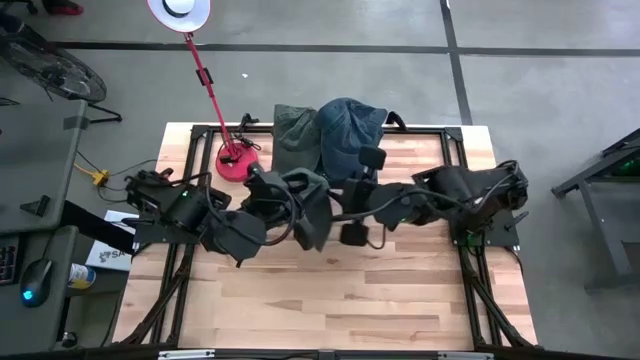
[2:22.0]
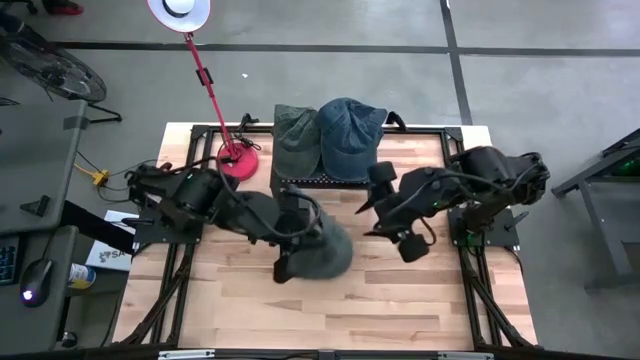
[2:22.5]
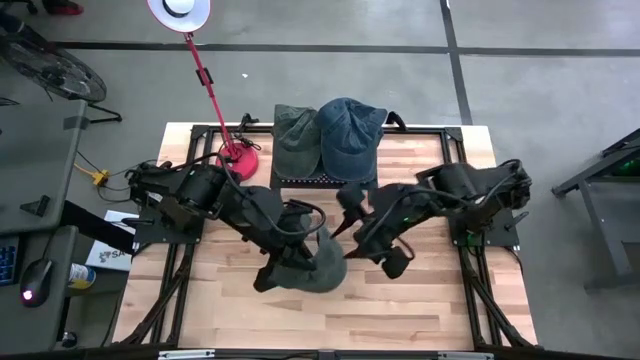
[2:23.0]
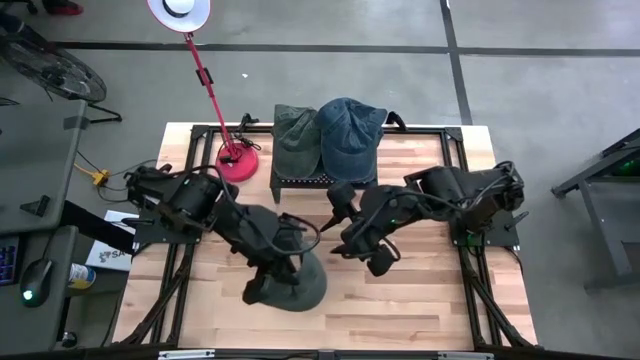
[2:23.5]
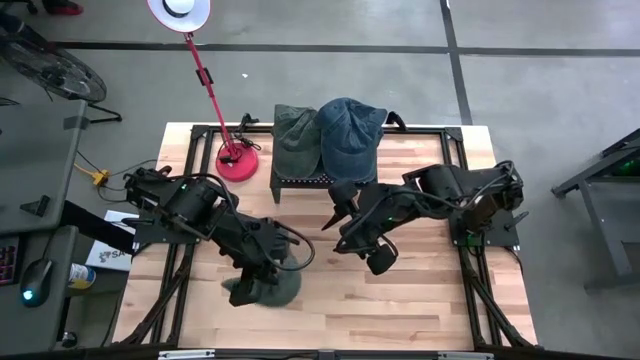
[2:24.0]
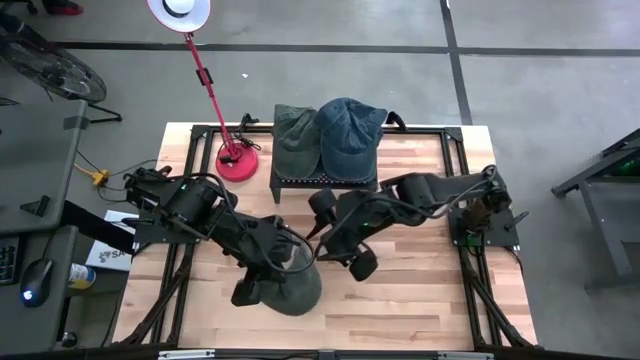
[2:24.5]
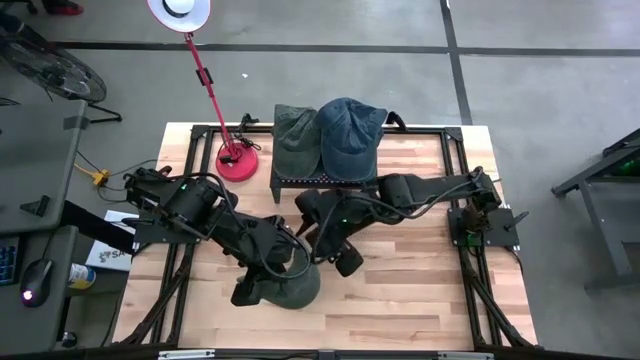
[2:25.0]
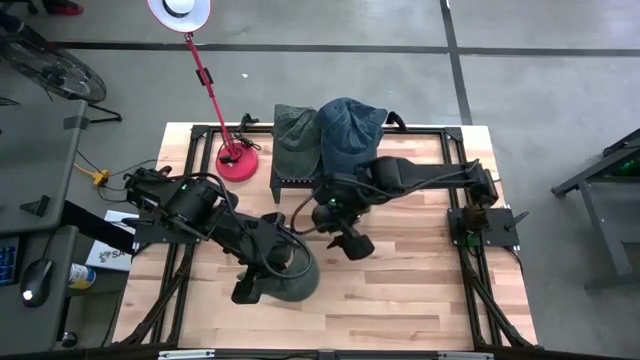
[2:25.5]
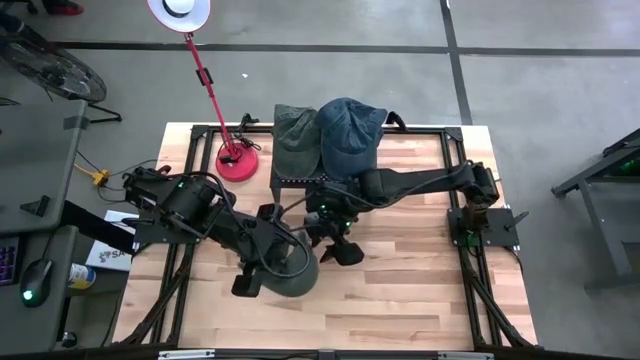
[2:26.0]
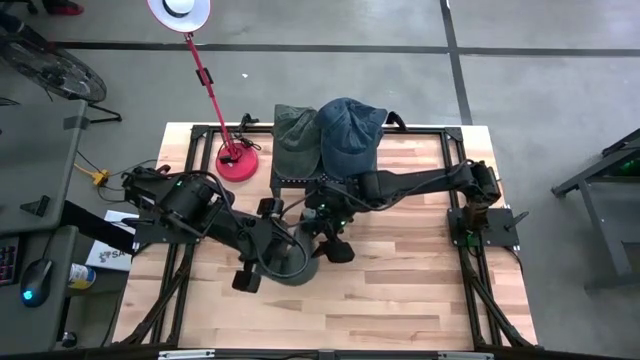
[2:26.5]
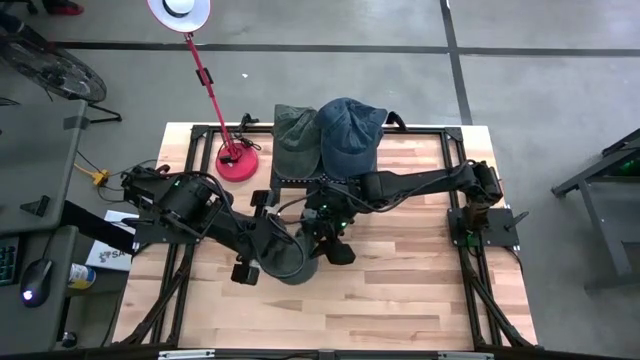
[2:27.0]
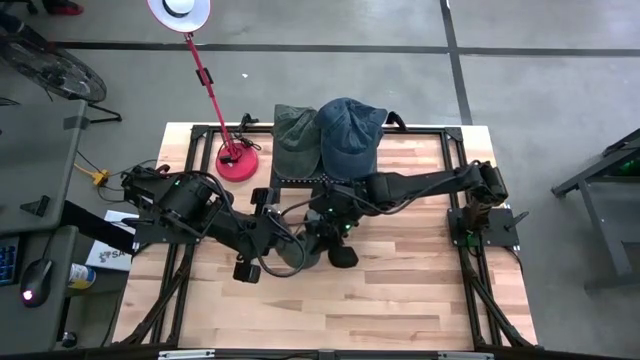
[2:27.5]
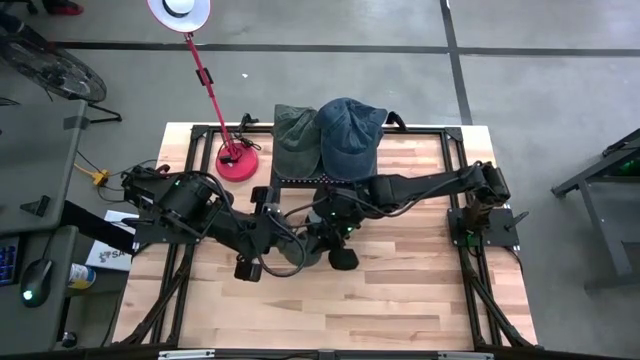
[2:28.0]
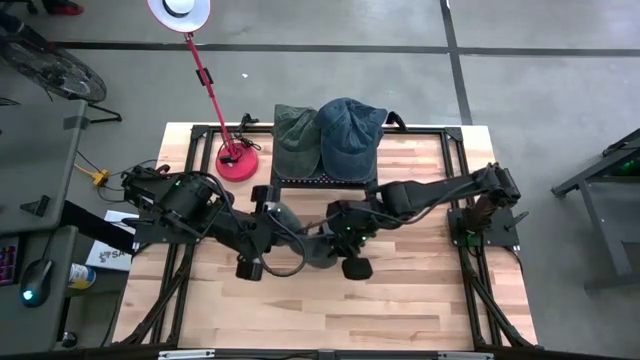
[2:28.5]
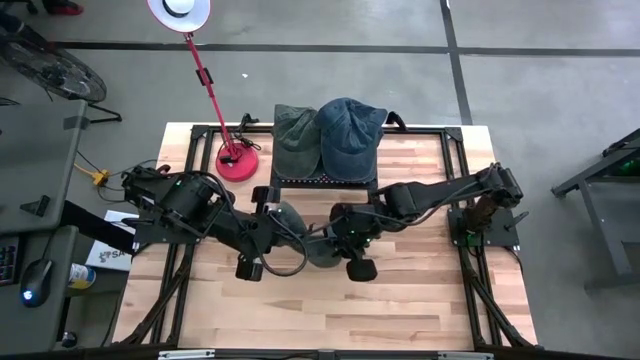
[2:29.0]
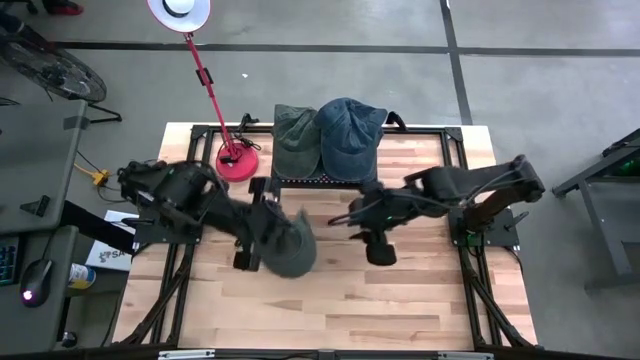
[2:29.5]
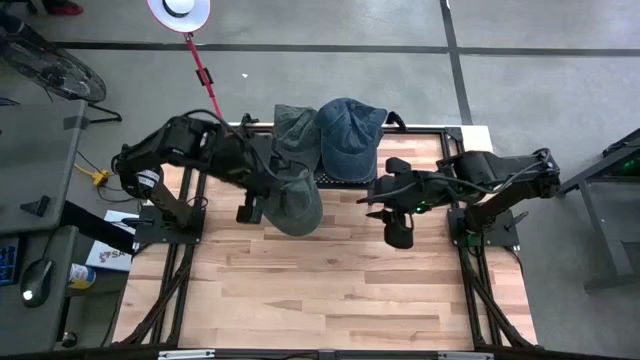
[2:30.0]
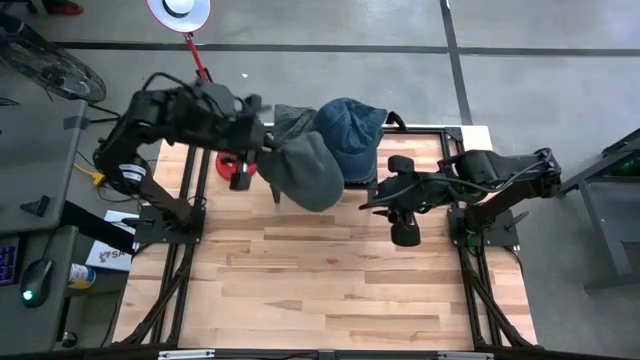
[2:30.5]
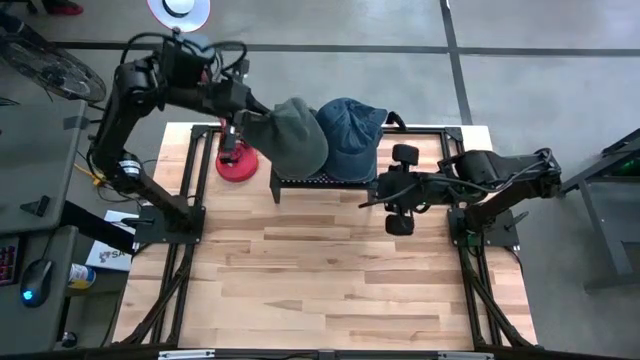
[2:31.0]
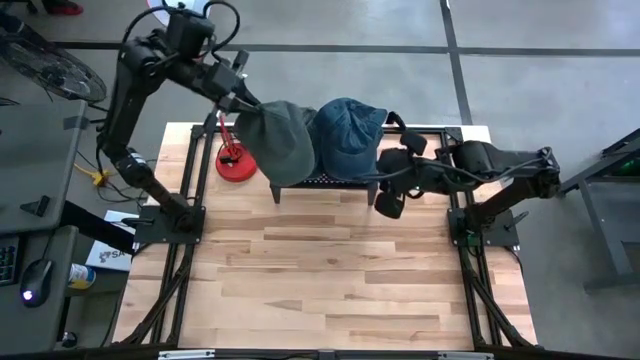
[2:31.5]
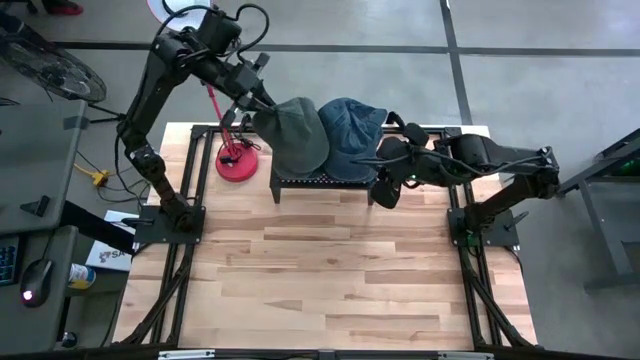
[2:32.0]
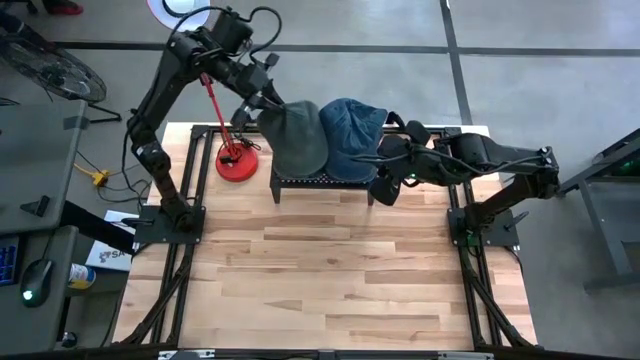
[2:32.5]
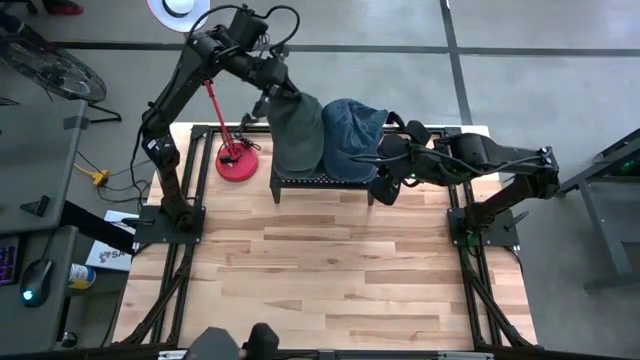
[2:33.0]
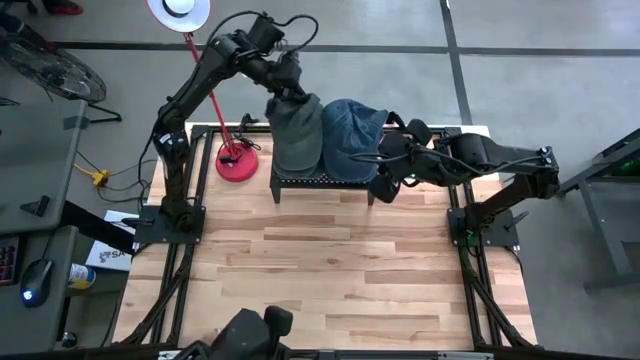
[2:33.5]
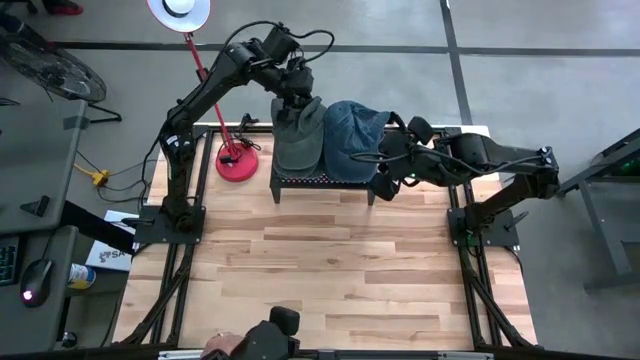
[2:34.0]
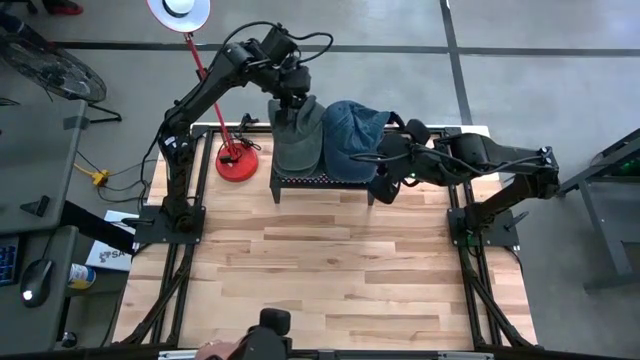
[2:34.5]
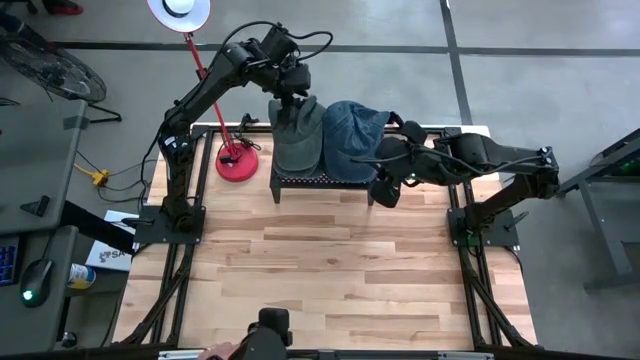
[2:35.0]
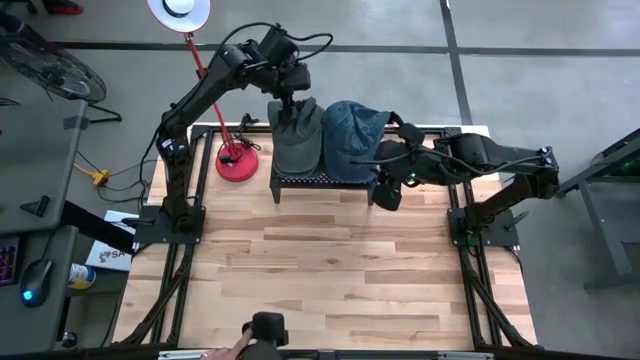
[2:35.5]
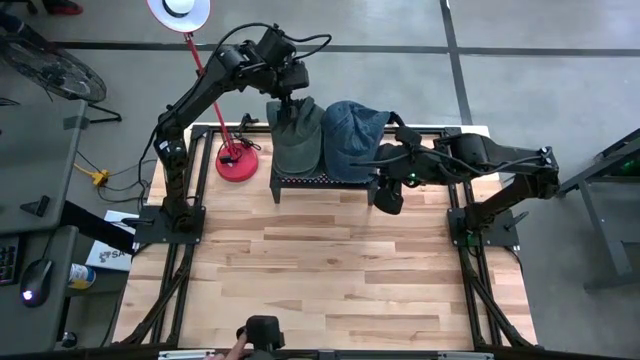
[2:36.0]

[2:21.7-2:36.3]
Task: Pick & Place hat
Stack the gray cap on top of the other gray cap on the shelf

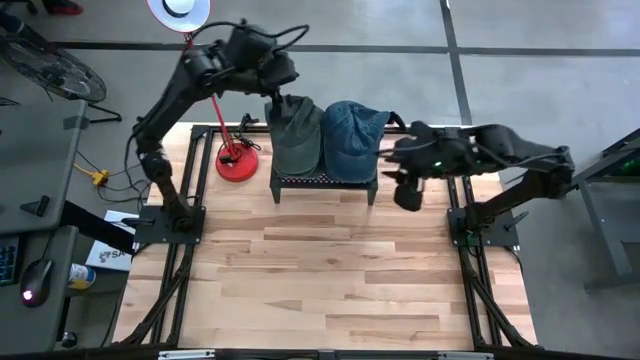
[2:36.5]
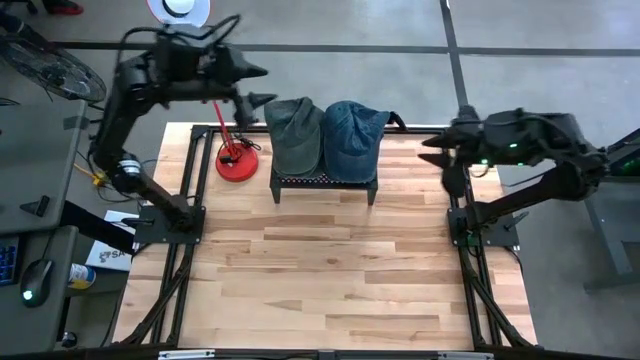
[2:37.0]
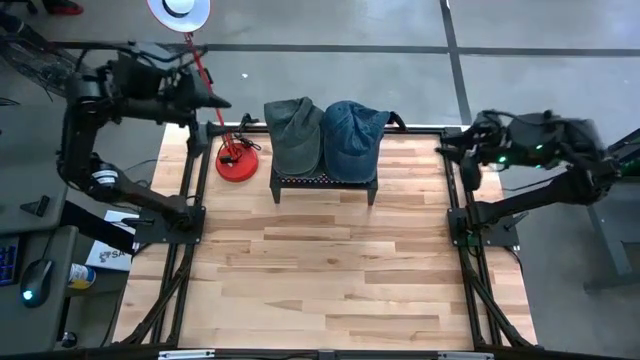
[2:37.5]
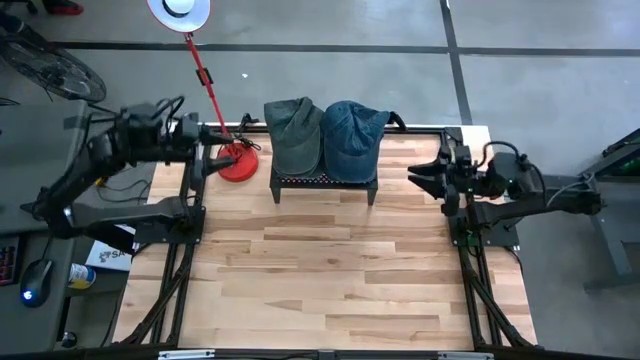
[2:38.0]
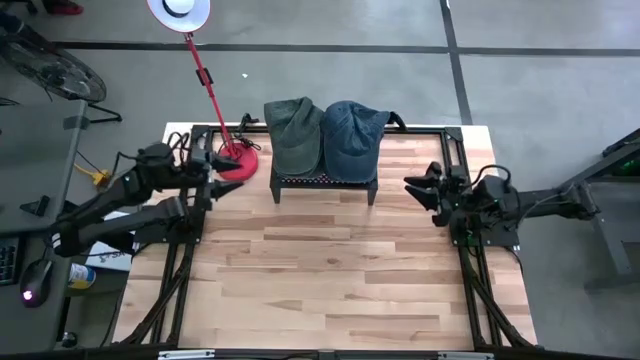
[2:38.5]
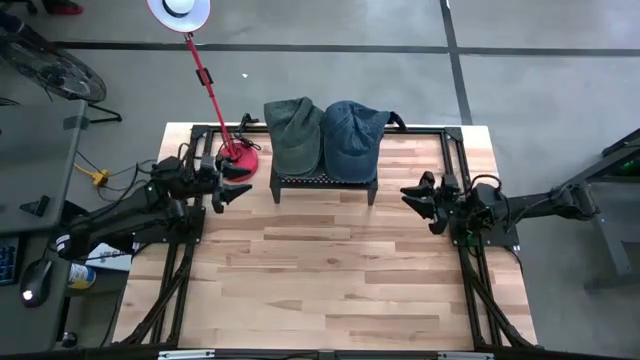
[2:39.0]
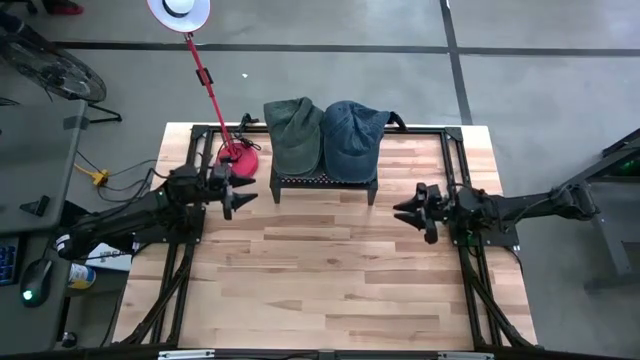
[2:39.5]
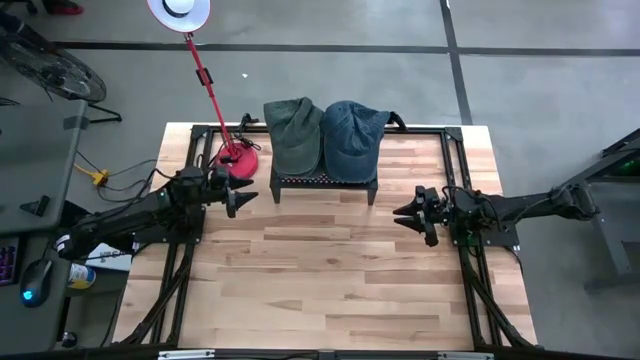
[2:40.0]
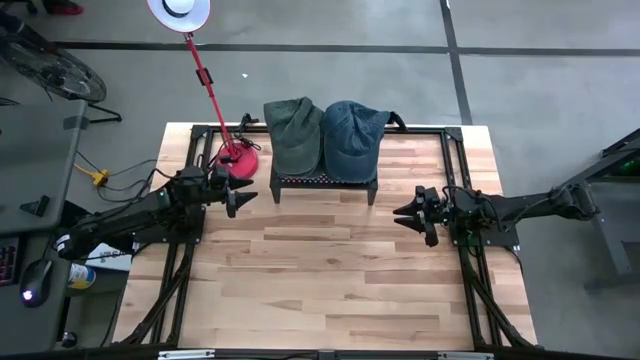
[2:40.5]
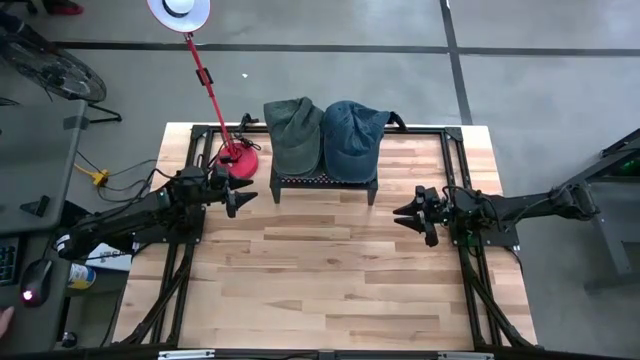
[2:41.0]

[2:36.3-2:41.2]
Return to Home Position

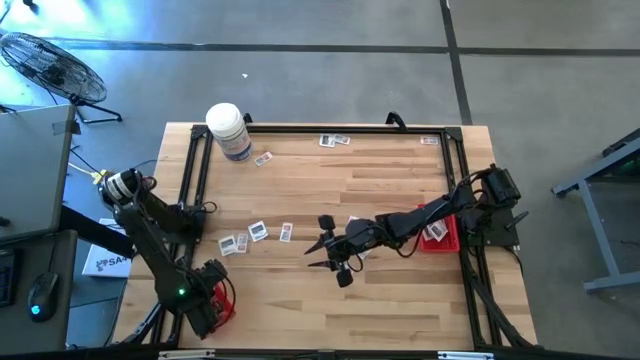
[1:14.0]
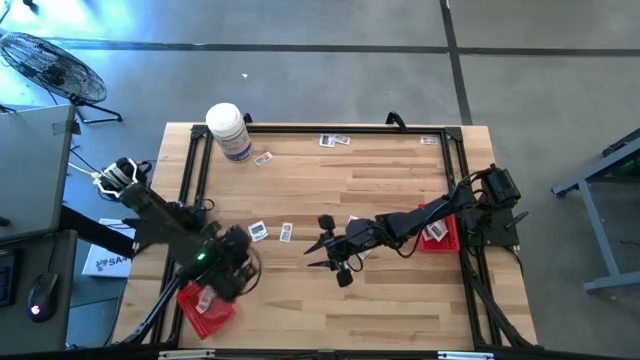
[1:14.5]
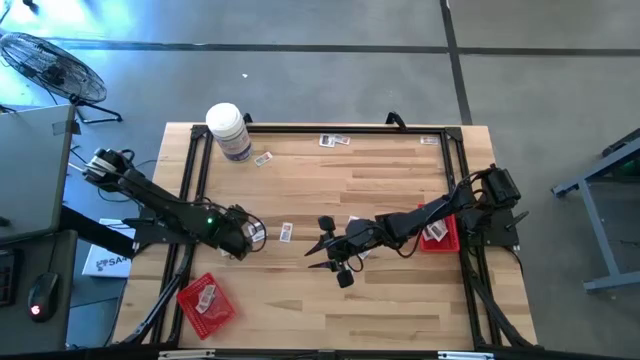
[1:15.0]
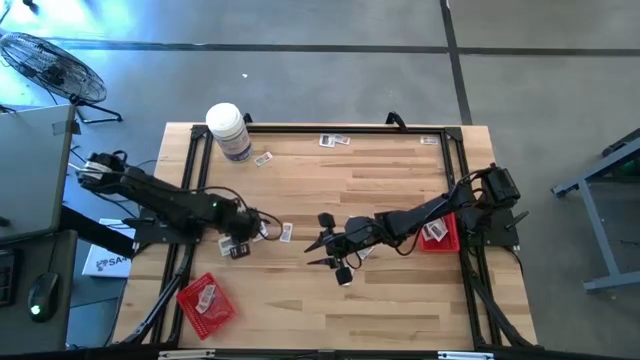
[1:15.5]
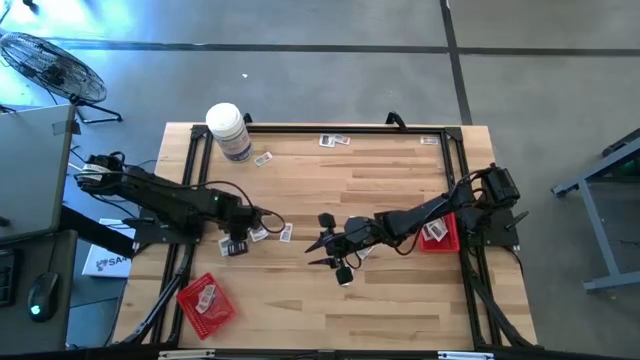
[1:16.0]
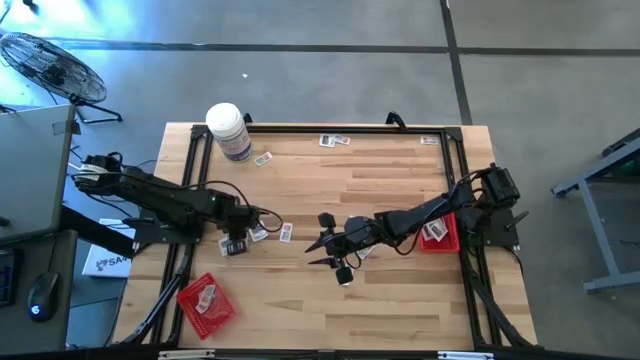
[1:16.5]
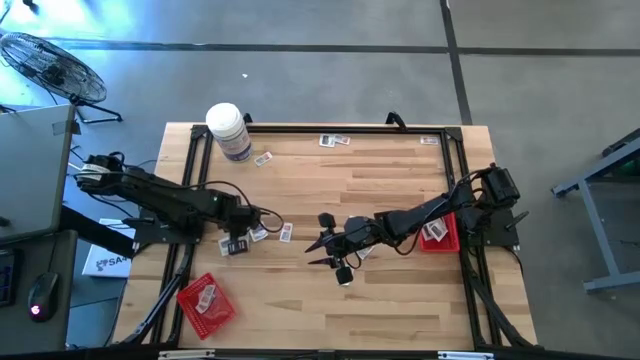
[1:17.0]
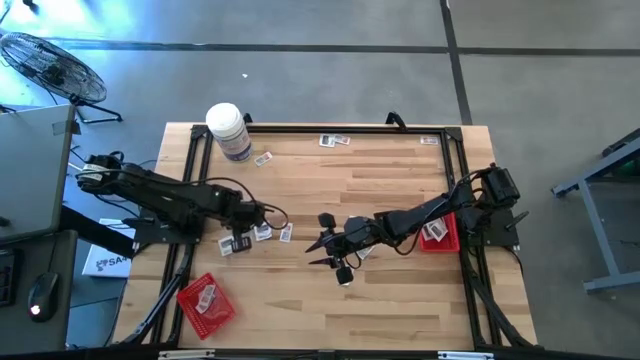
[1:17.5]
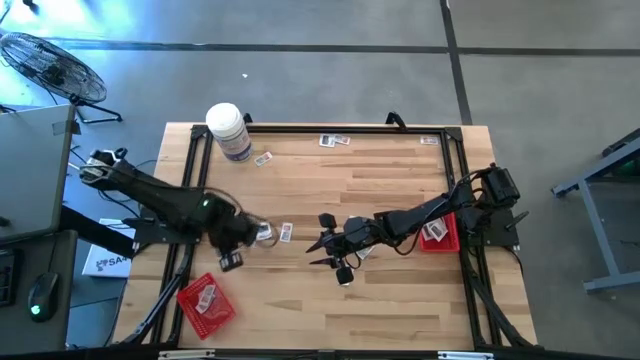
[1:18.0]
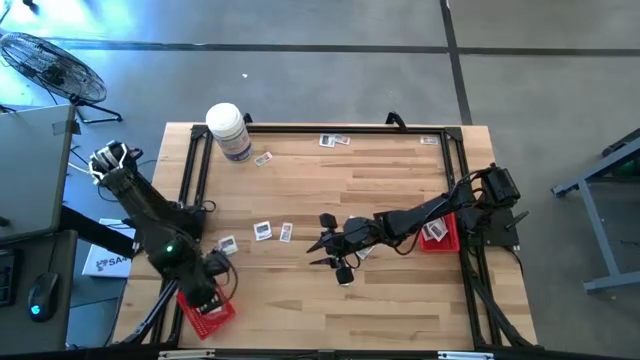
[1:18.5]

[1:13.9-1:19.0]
Task: Pick & Place First Aid Supplies
Put the ointment pack into the left red bin
